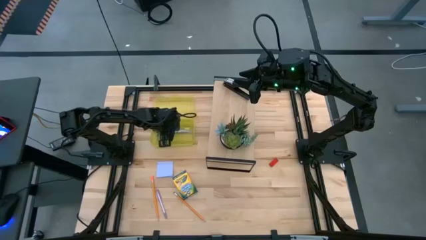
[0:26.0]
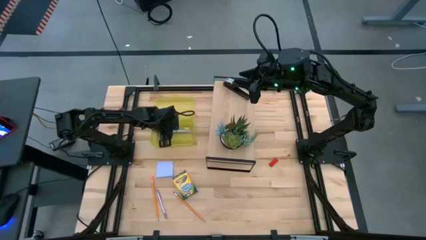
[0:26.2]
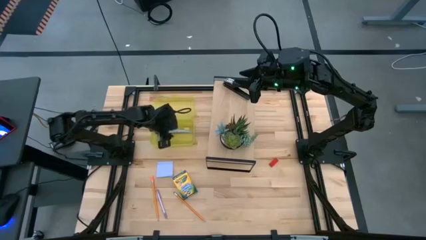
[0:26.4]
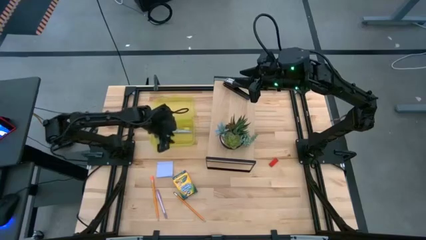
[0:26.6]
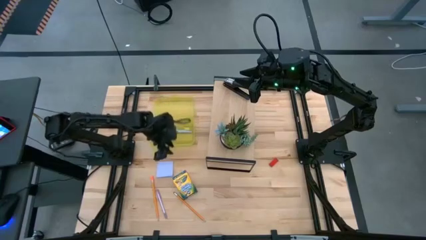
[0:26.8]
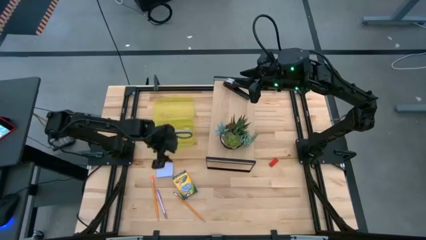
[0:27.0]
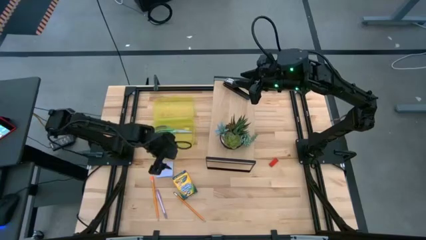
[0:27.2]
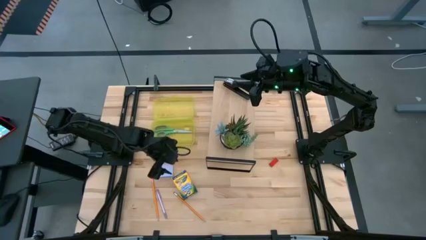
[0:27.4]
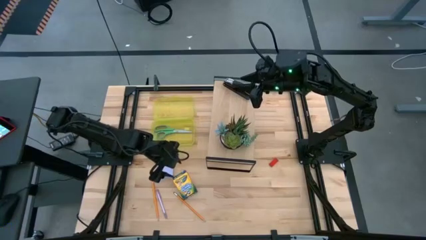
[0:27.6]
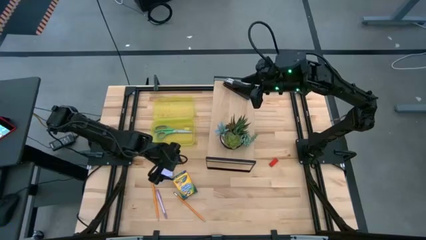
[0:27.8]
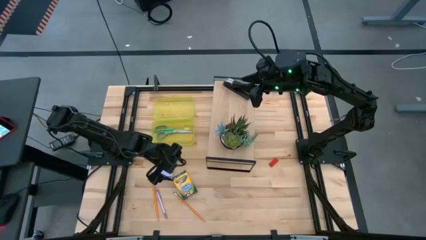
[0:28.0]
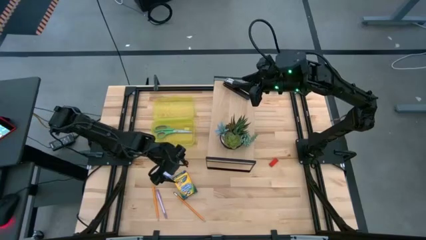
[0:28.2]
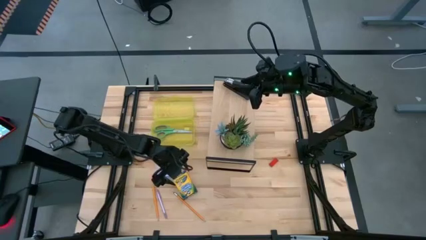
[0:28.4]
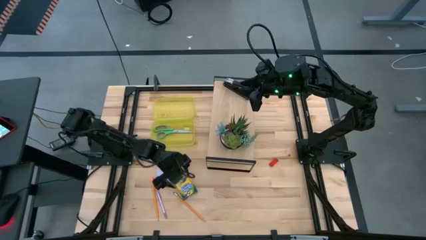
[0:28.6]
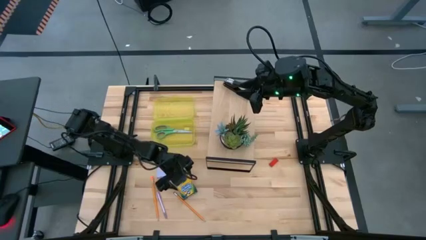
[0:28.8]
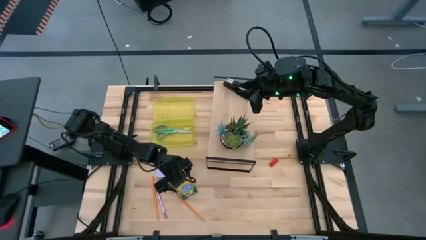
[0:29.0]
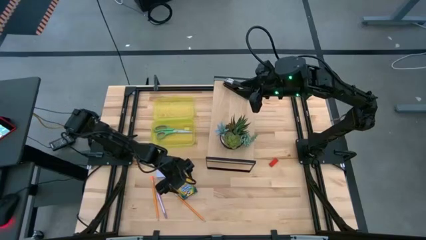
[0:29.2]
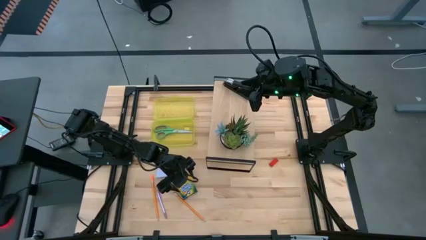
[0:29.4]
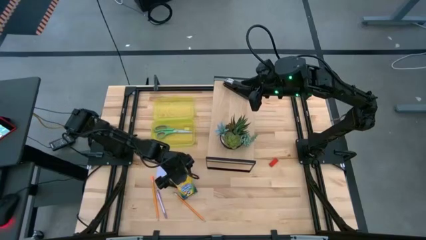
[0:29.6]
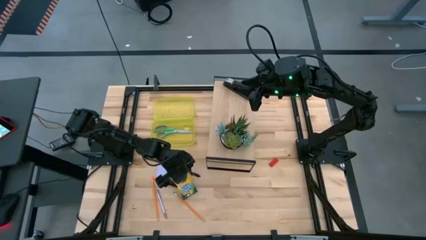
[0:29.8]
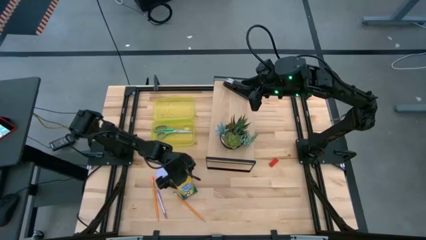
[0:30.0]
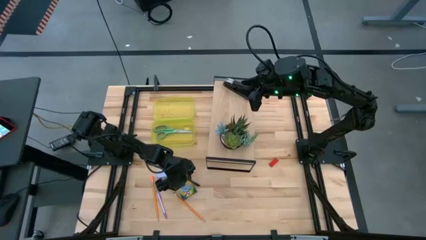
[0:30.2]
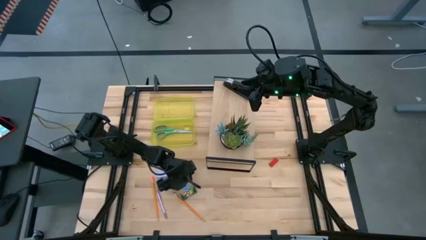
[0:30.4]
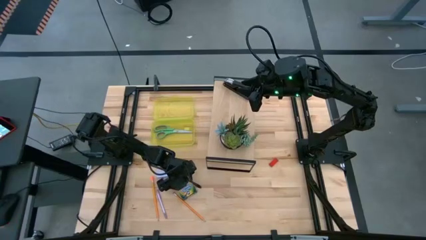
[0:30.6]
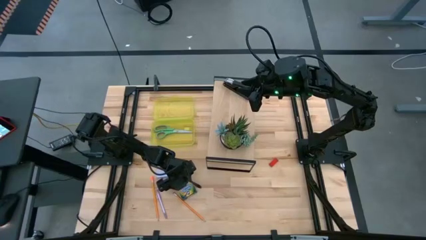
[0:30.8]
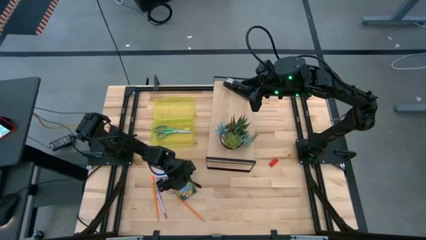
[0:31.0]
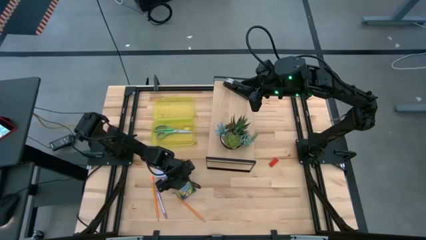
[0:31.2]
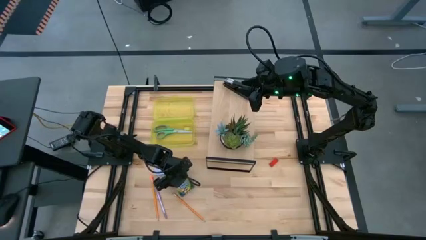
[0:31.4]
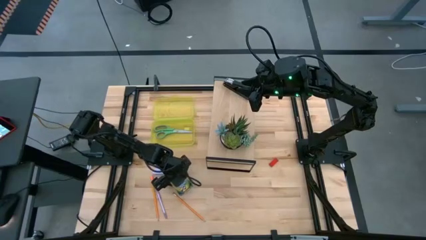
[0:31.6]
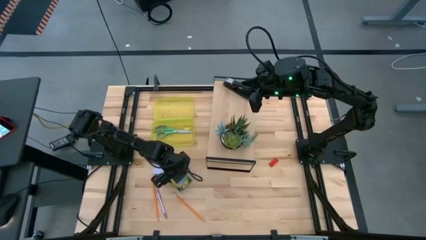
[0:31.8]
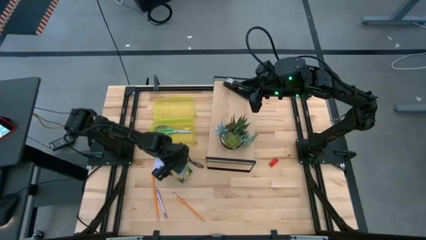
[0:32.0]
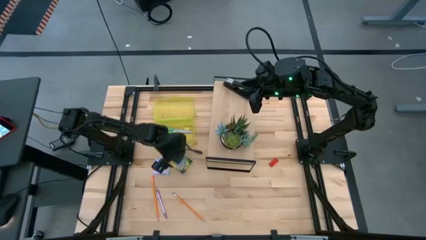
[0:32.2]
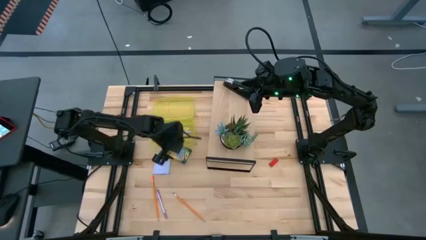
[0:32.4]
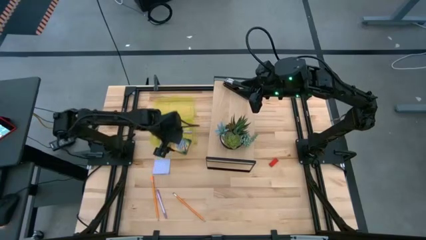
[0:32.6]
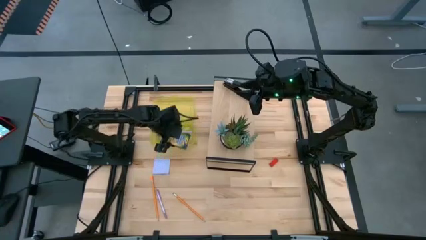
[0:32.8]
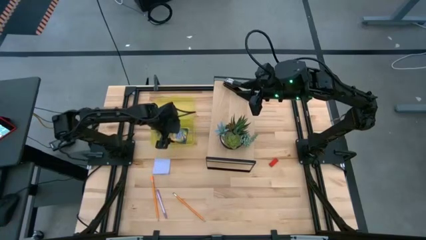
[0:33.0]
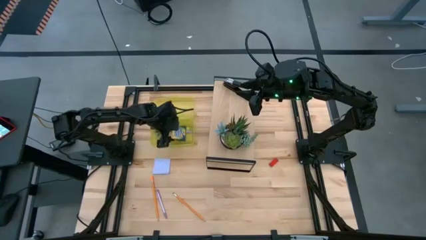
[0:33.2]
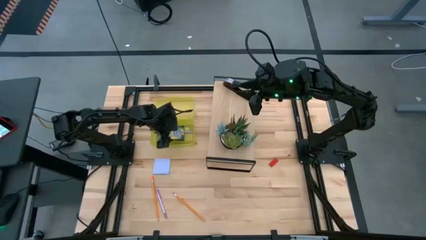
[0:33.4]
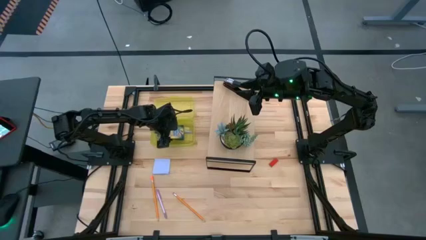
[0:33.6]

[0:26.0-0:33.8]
Task: Pack school essentials
Put the yellow crayon box into the yellow supply box

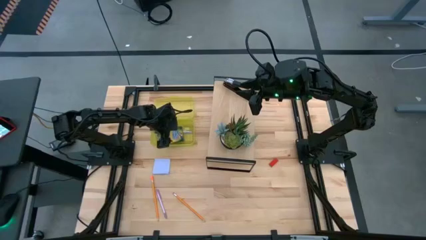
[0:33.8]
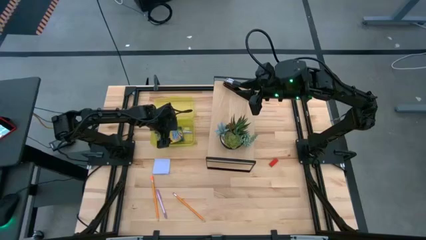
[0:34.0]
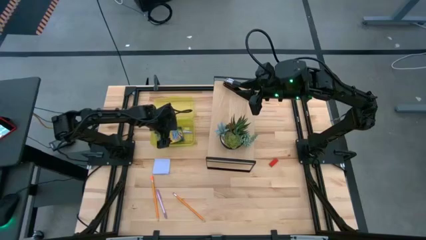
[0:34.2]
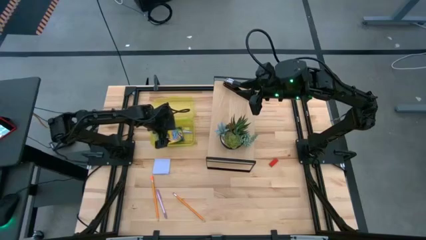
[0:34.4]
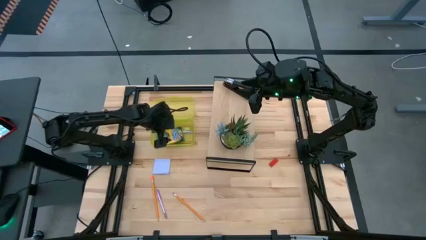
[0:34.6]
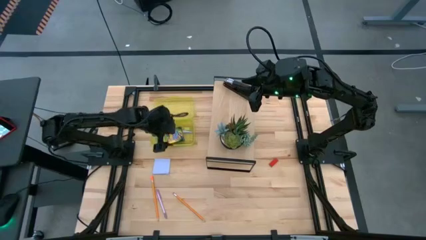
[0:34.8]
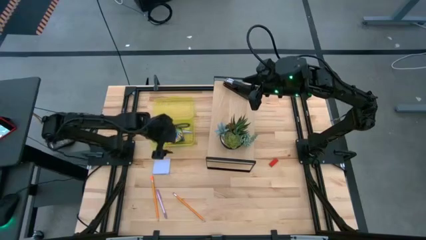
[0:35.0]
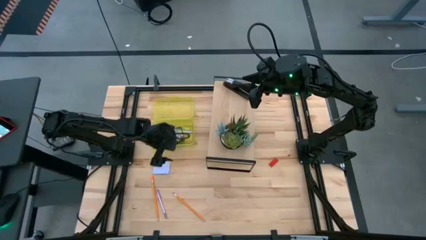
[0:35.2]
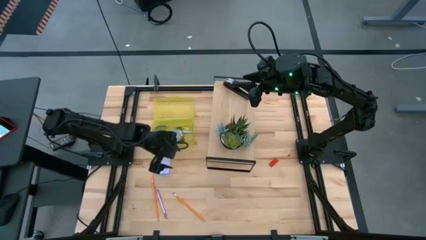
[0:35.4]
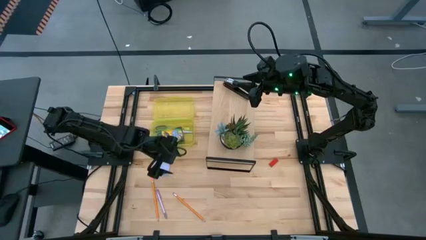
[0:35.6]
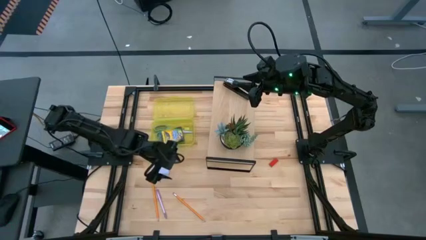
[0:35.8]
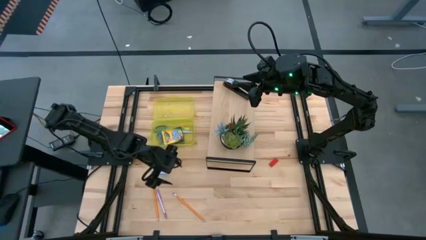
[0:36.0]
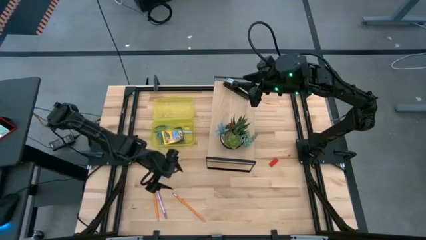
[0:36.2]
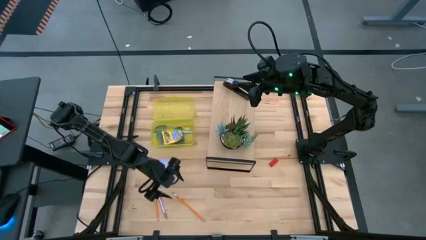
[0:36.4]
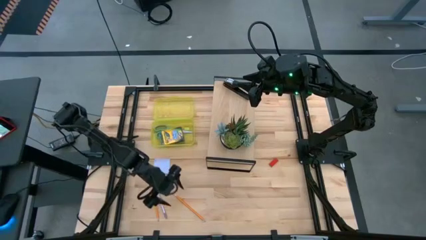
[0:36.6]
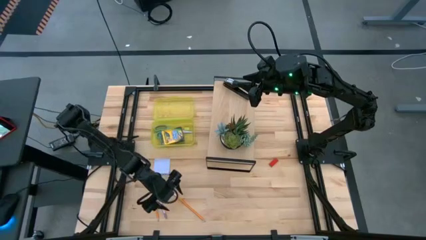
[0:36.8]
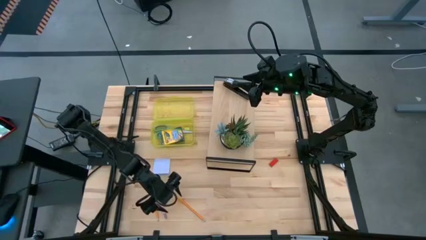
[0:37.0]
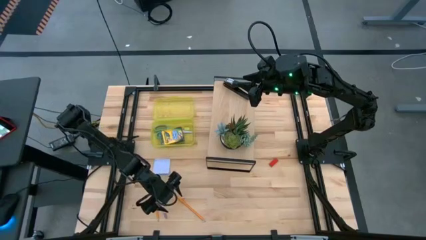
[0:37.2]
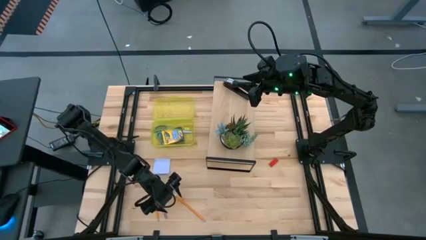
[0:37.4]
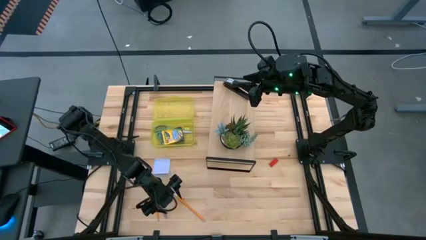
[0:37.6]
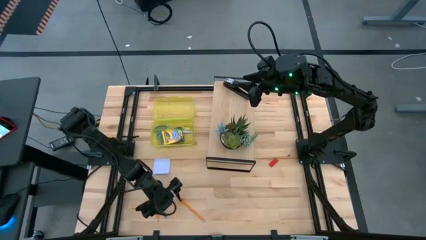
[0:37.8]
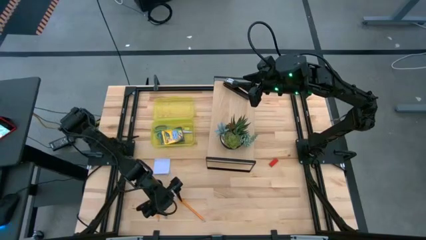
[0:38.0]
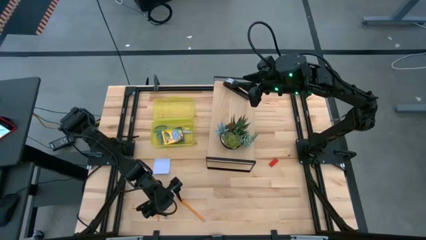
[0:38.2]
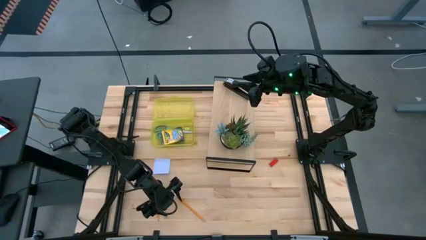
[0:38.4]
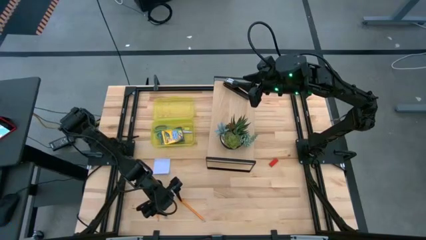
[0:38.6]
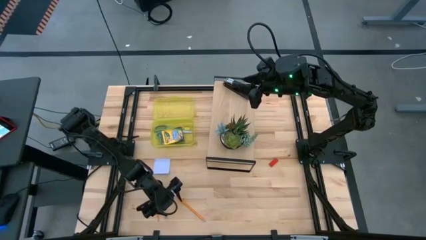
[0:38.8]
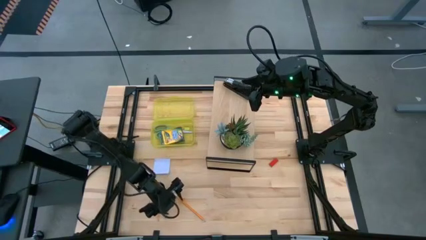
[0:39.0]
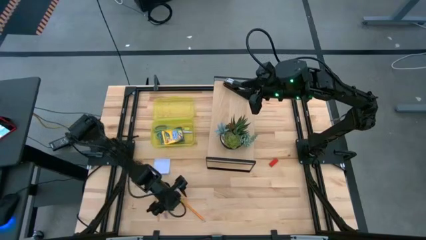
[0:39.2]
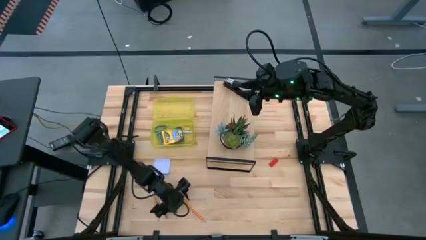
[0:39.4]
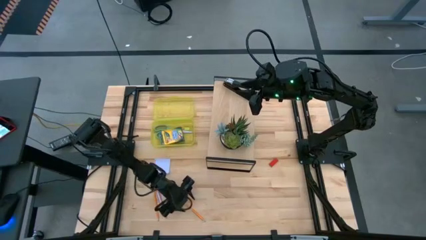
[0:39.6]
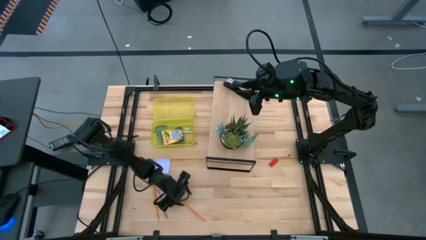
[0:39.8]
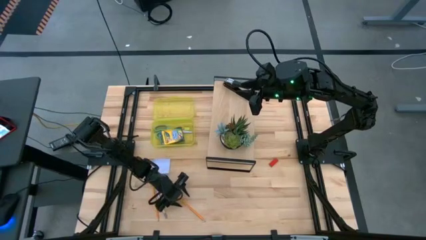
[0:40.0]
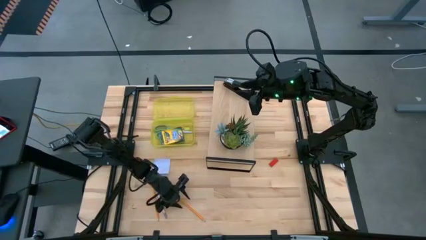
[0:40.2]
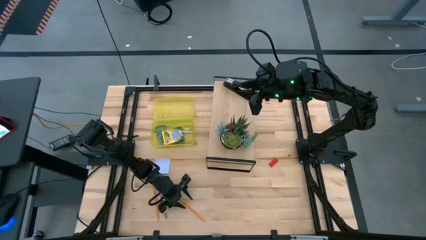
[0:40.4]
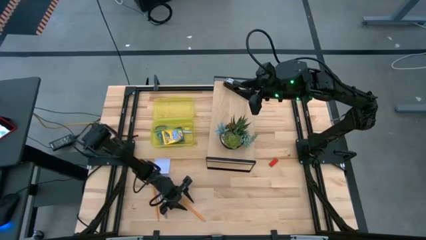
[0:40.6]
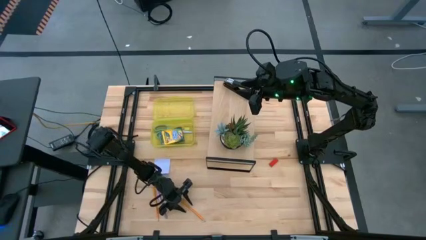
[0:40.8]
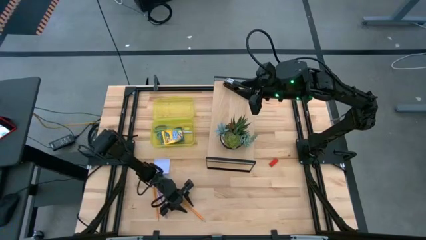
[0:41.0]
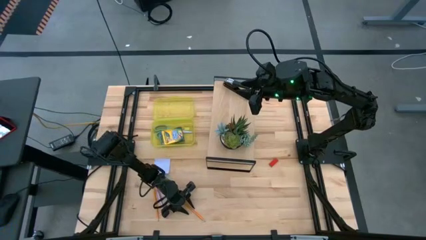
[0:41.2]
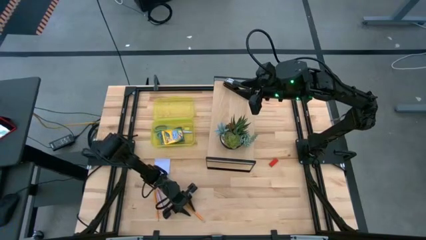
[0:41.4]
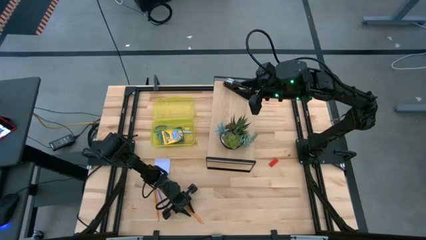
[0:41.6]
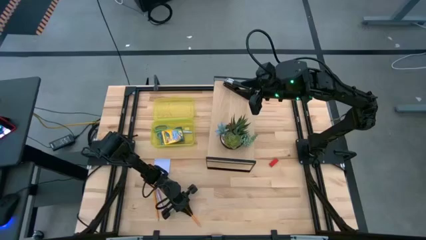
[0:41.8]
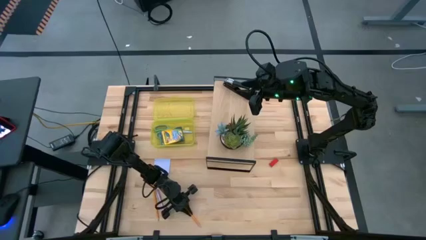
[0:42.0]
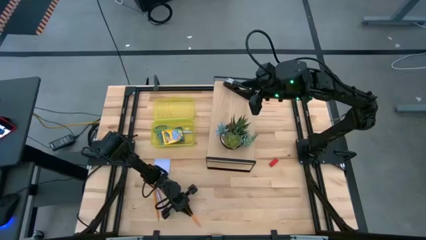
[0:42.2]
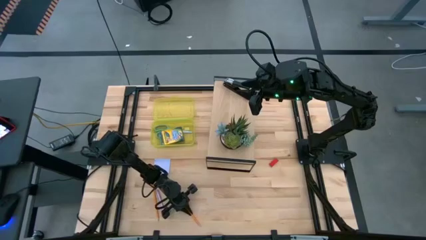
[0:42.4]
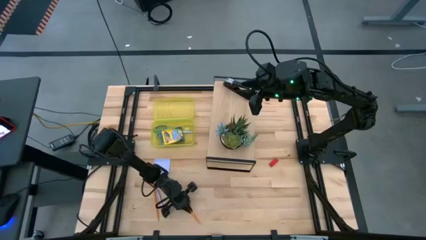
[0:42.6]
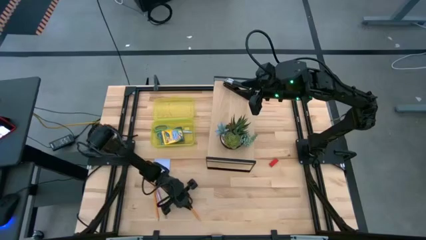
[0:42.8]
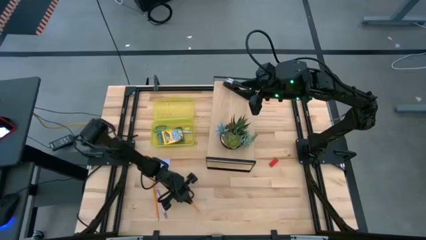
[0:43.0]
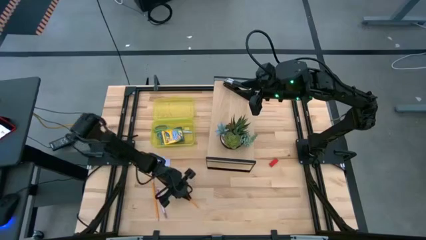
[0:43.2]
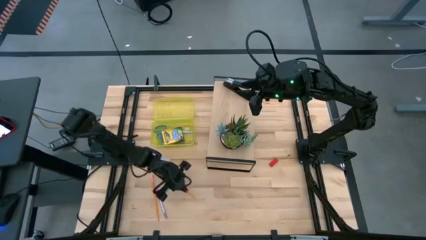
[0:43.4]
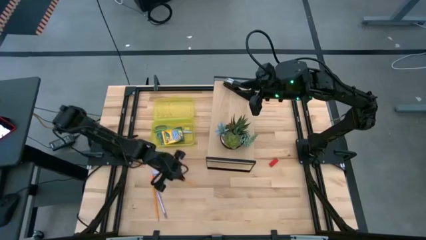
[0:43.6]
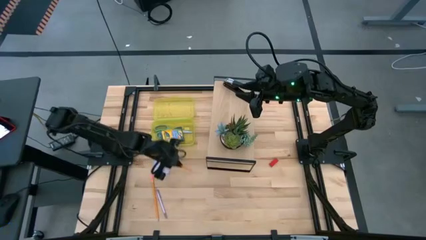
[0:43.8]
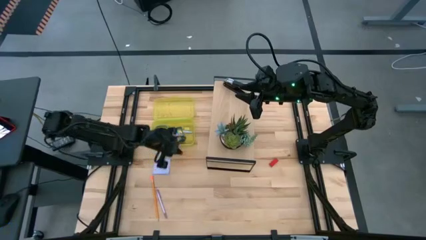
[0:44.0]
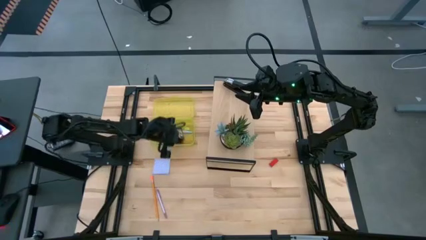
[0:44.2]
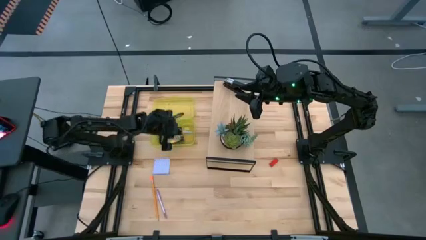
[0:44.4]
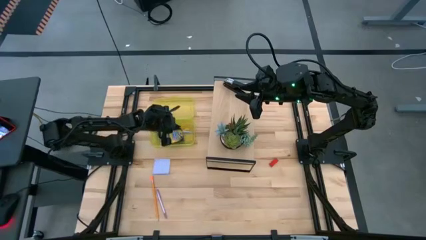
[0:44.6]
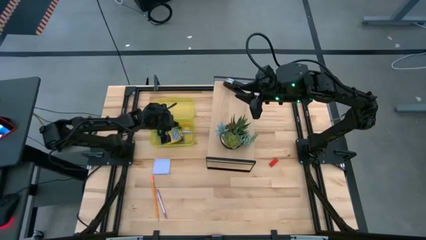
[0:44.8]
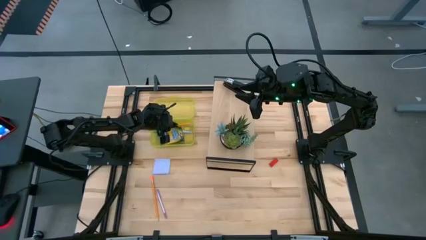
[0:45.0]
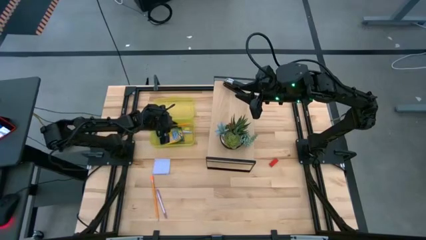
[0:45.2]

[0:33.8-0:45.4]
Put the orange pencil into the yellow supply box
